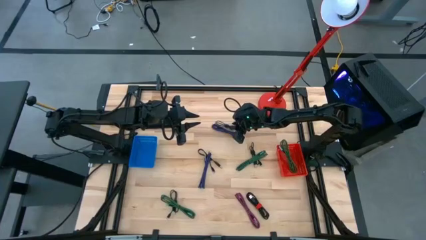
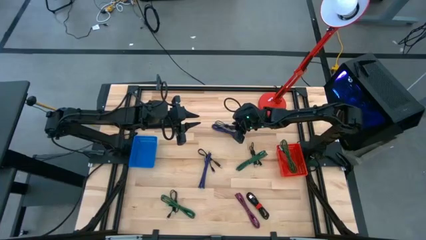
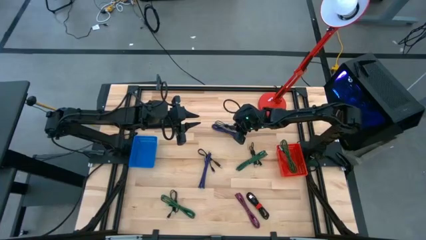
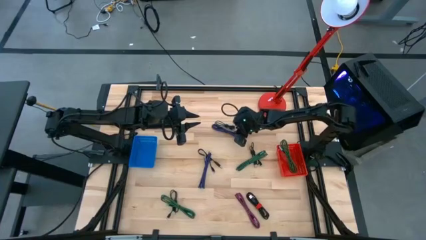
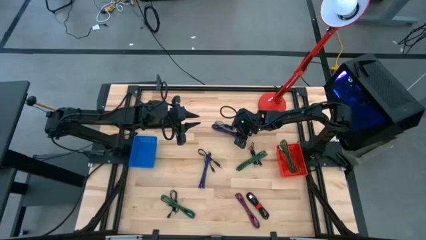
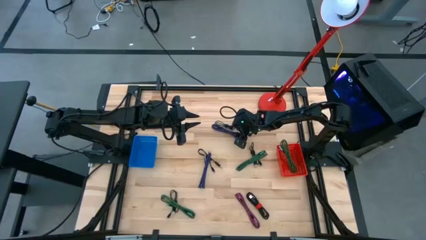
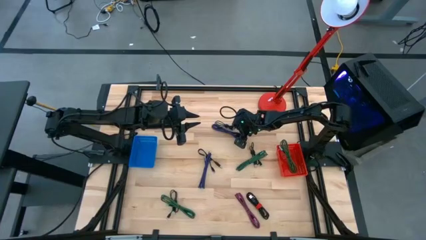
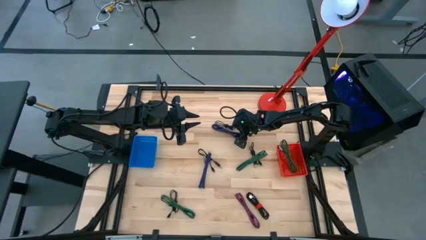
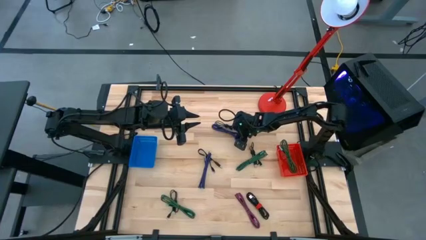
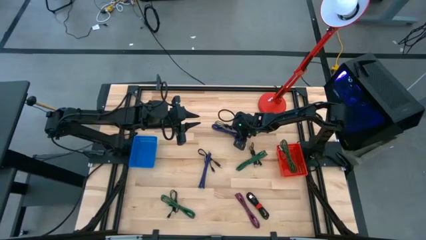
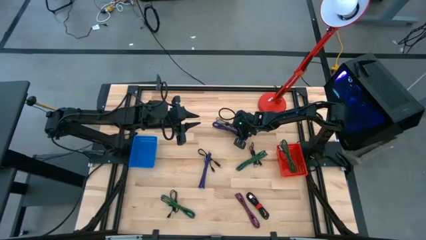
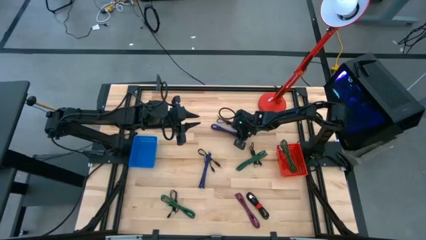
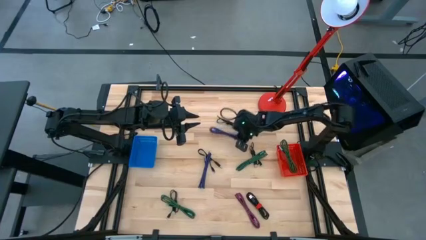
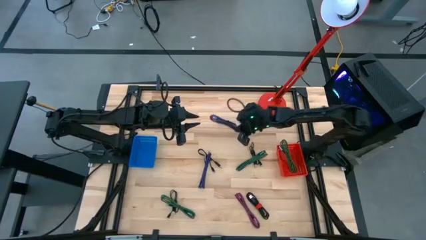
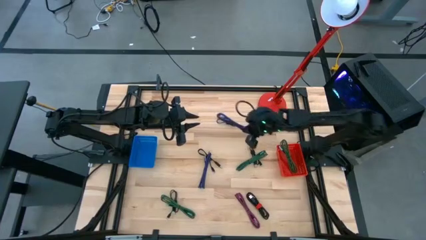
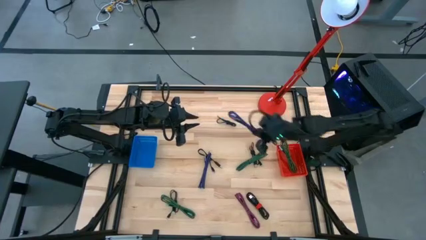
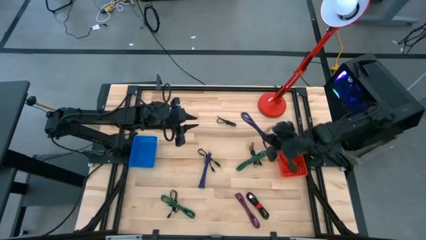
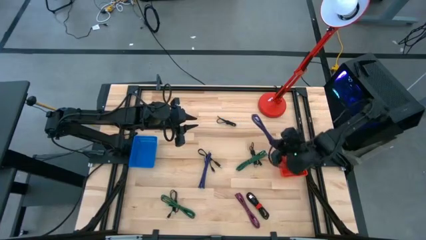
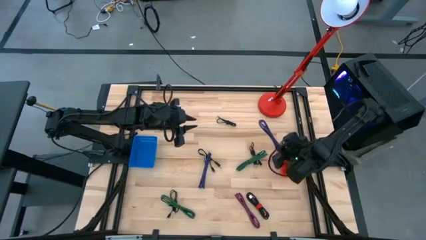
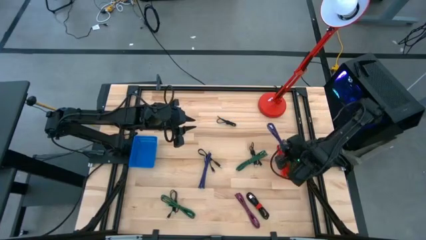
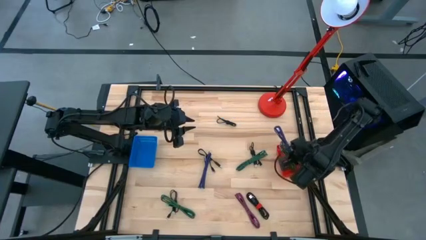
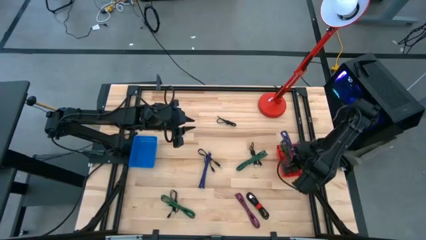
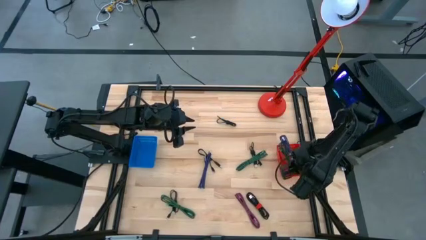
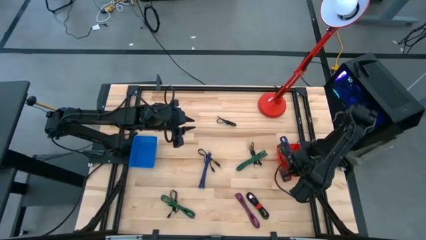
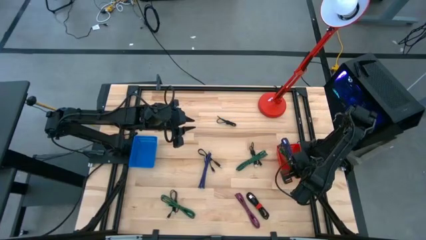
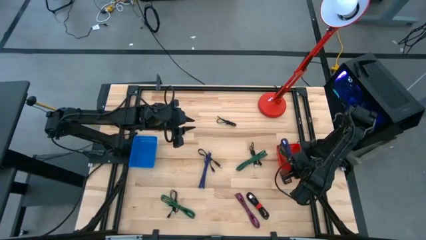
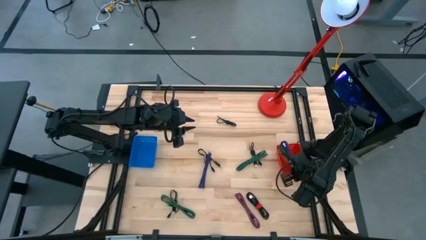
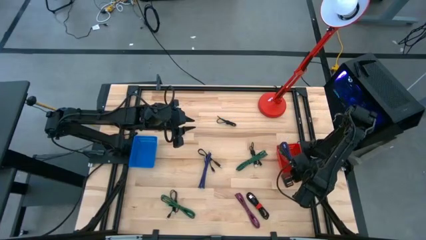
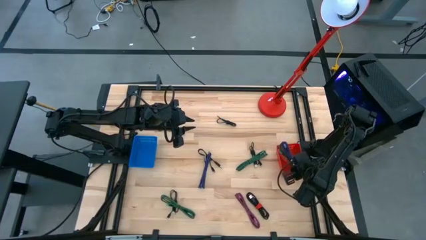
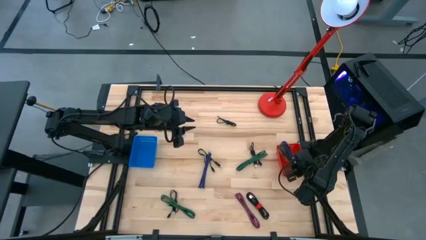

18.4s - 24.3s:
Task: Pick & Place USB Port
Put the black and violet charger cable into the red basket

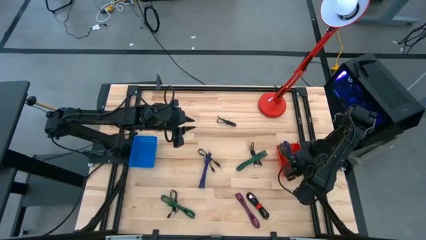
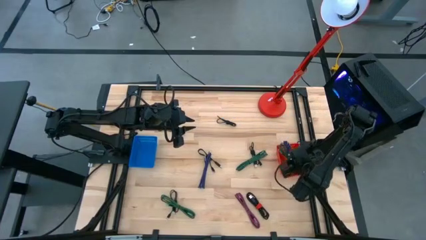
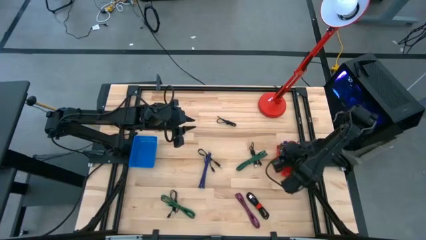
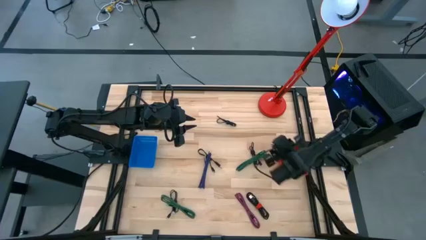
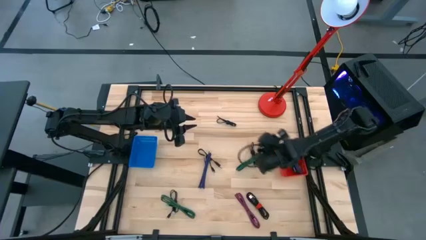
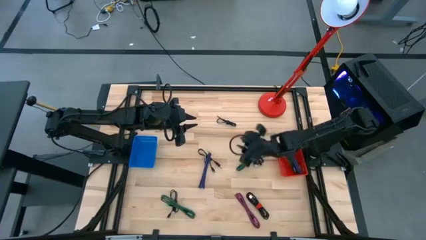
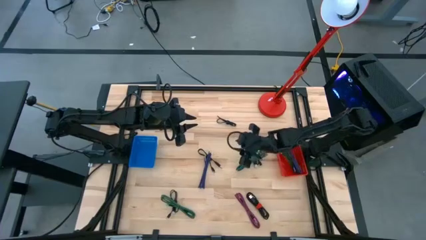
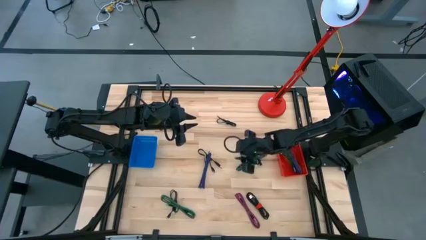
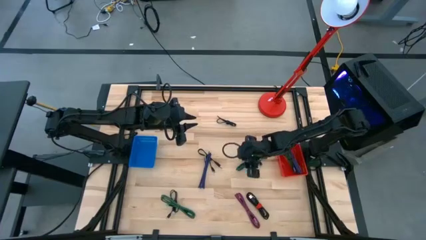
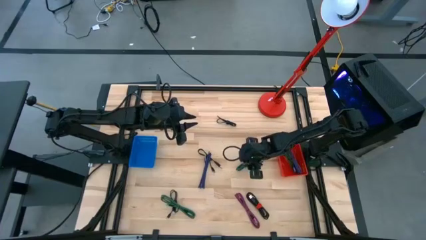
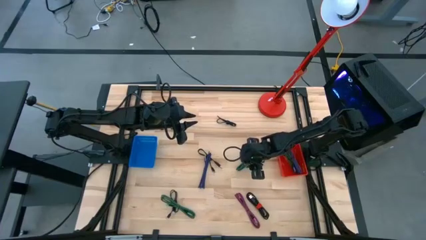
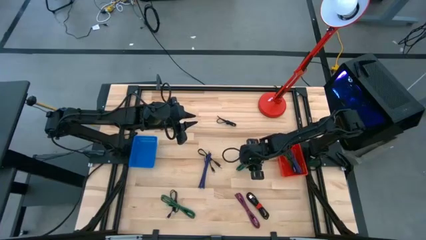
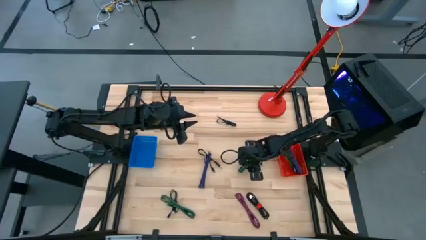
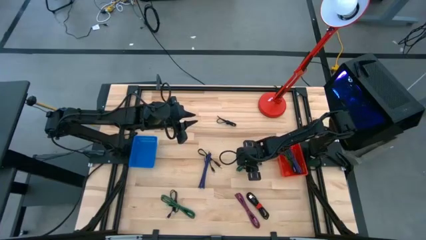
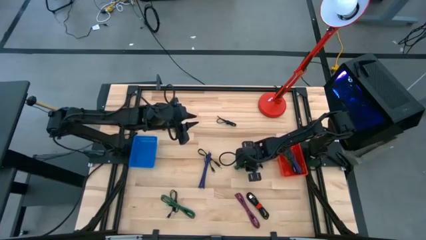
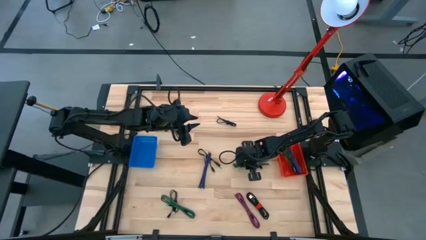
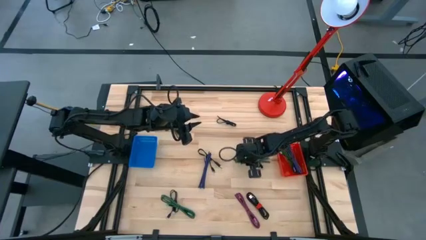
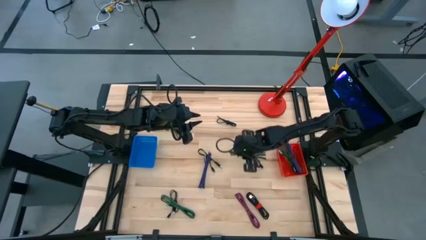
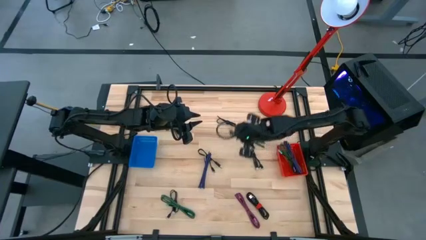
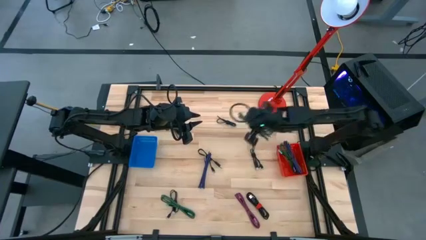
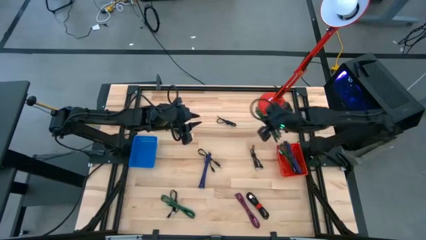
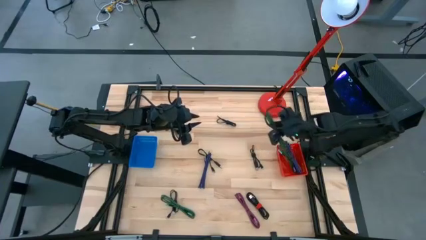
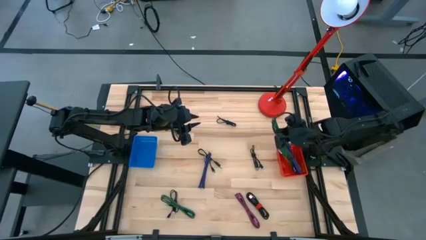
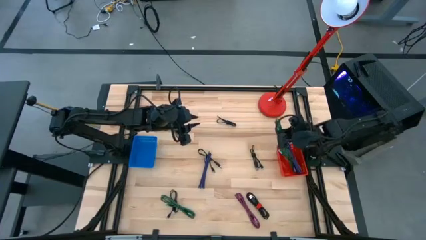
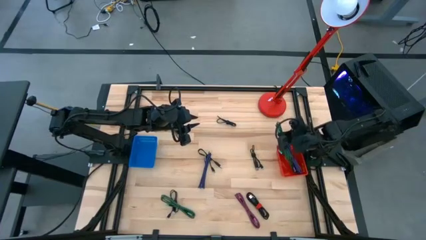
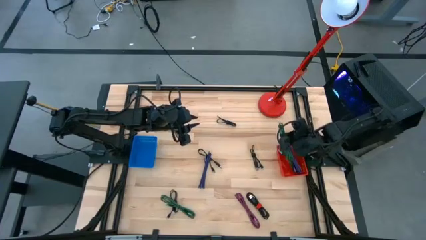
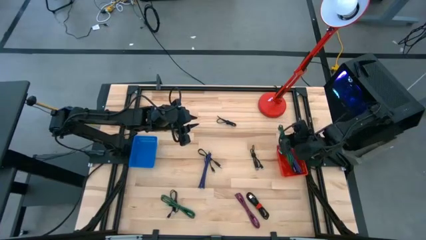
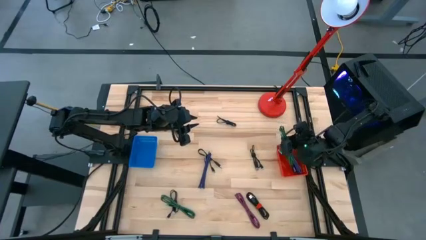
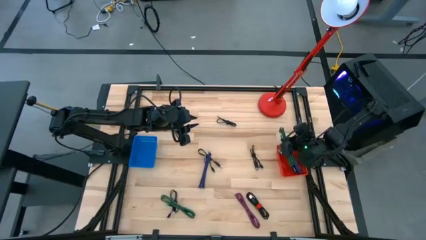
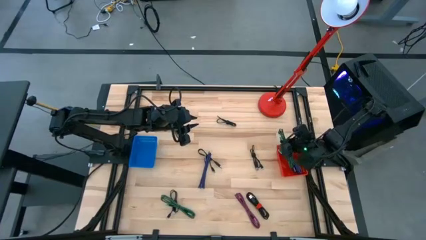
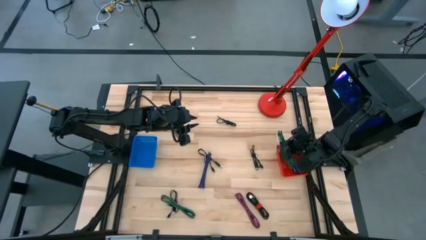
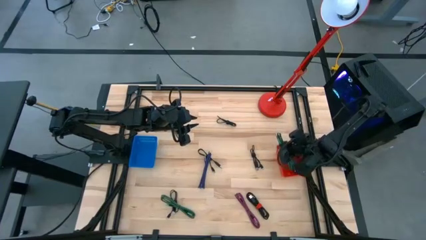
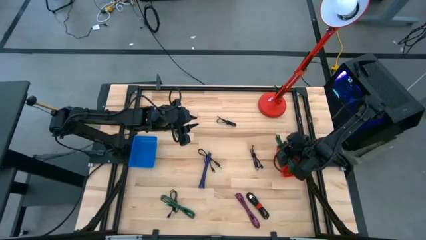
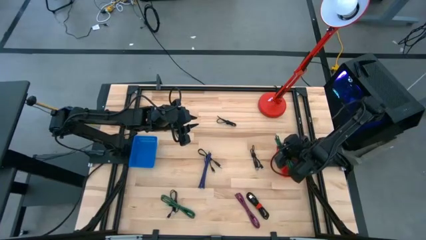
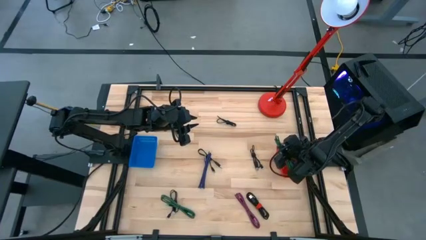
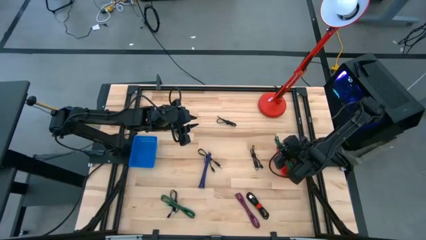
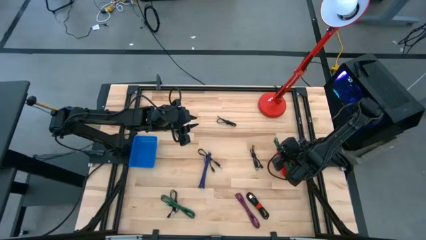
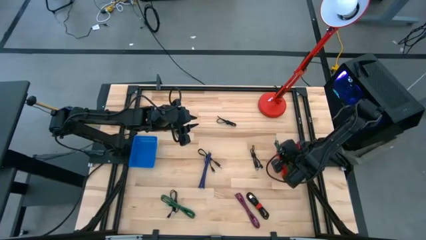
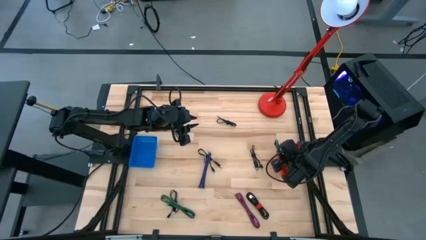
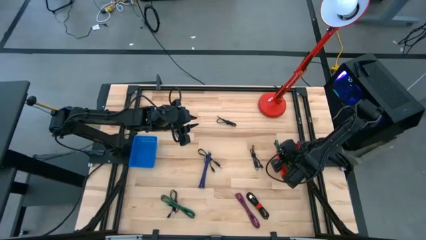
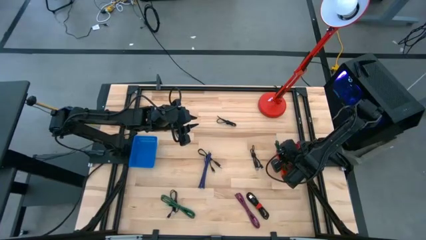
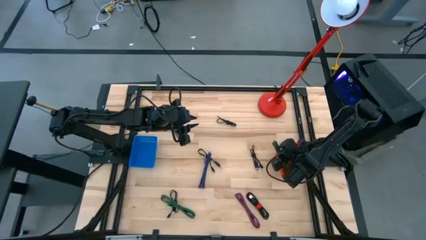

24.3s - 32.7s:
Put the black and green charger cable into the red basket
